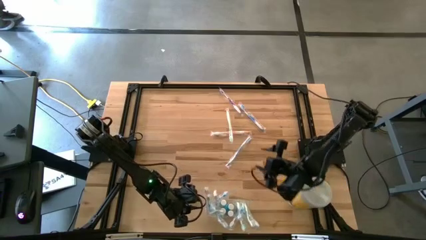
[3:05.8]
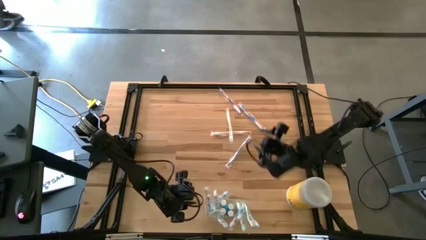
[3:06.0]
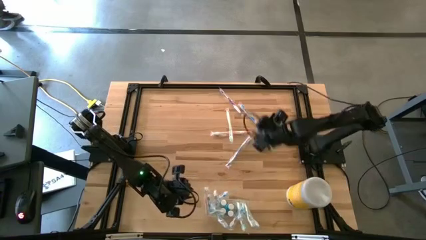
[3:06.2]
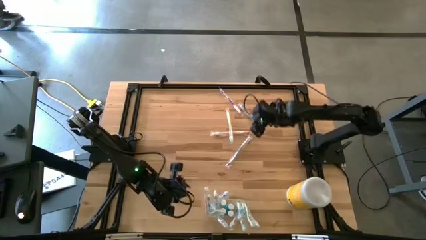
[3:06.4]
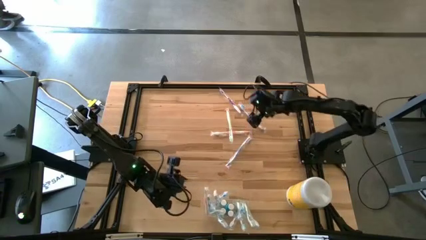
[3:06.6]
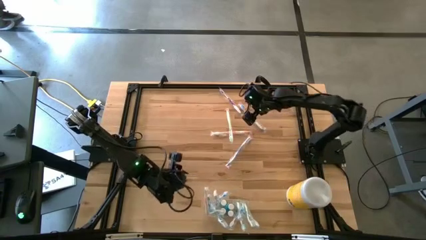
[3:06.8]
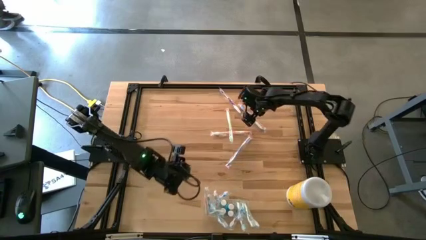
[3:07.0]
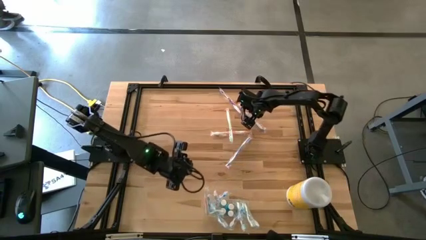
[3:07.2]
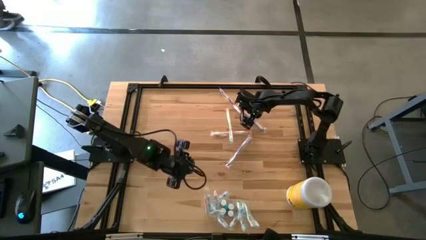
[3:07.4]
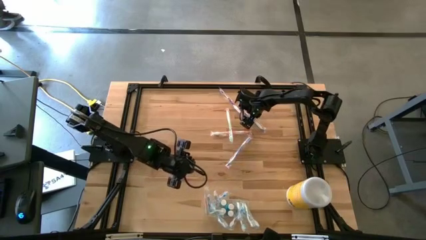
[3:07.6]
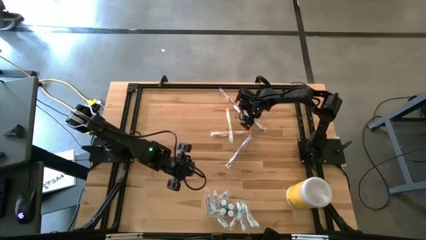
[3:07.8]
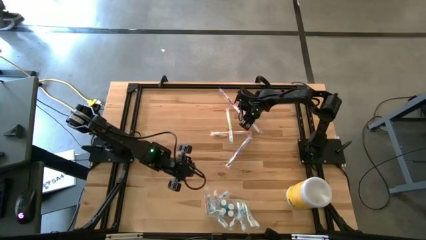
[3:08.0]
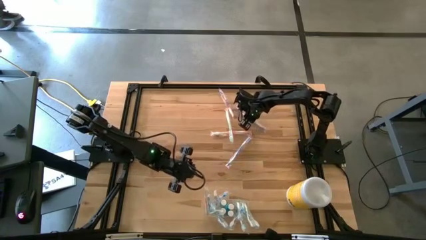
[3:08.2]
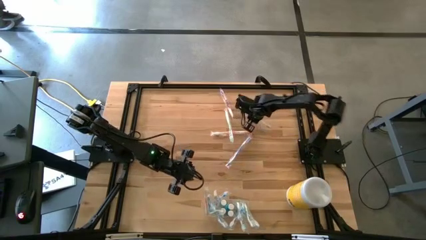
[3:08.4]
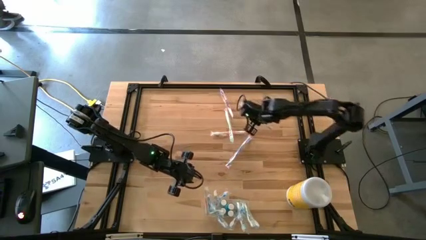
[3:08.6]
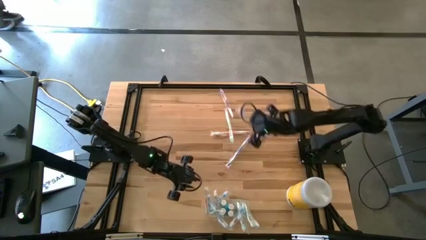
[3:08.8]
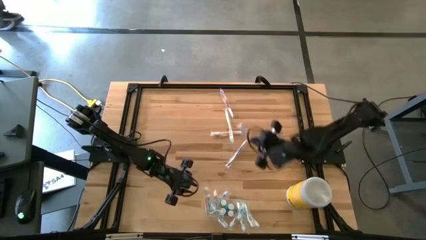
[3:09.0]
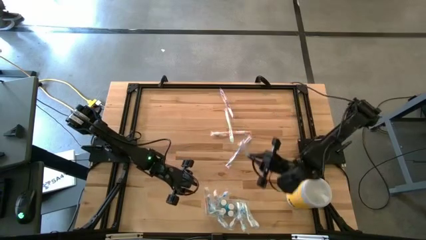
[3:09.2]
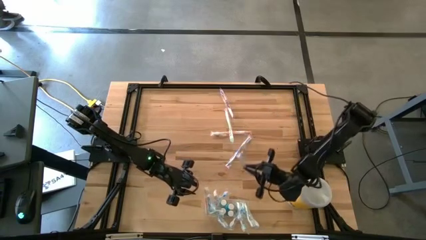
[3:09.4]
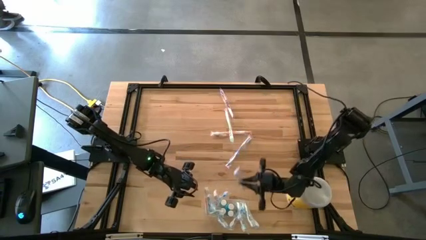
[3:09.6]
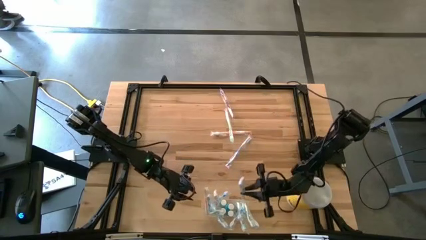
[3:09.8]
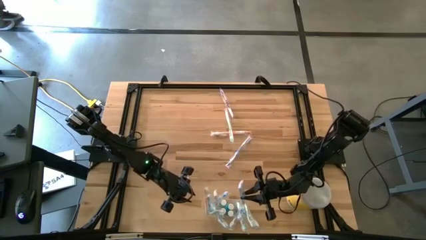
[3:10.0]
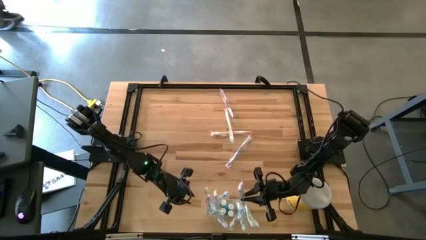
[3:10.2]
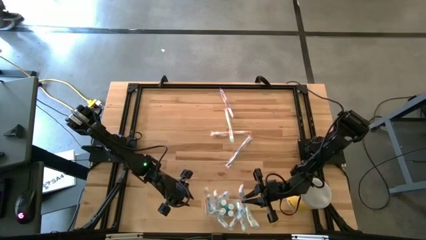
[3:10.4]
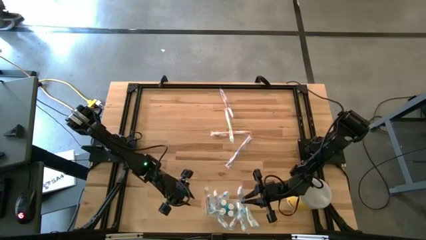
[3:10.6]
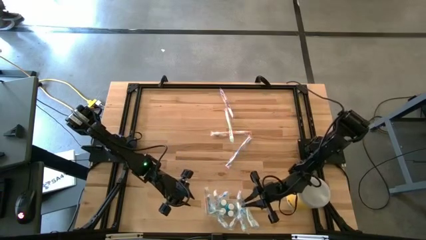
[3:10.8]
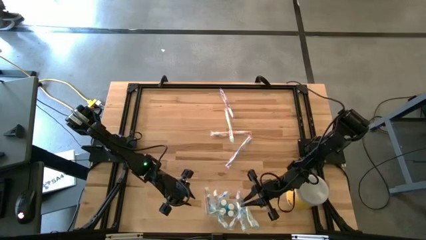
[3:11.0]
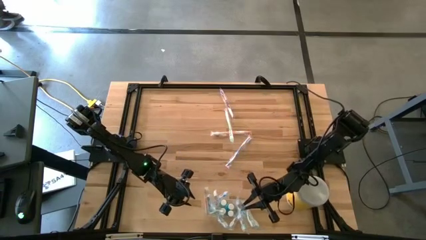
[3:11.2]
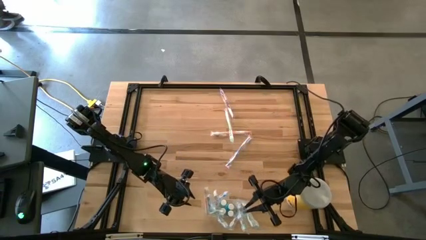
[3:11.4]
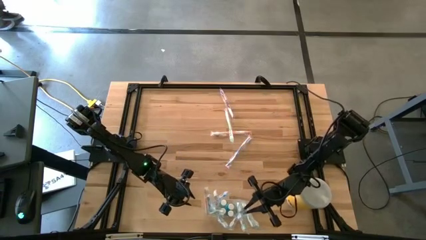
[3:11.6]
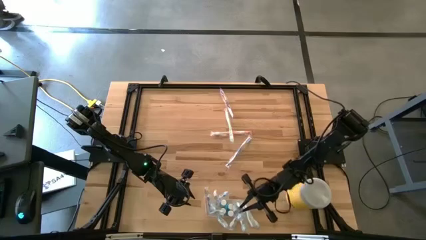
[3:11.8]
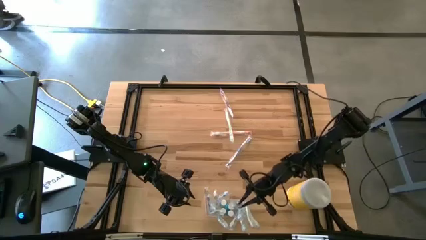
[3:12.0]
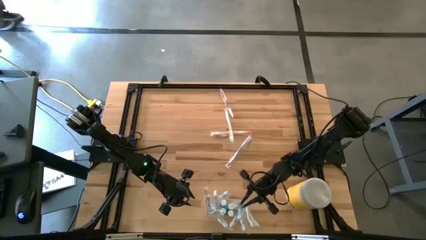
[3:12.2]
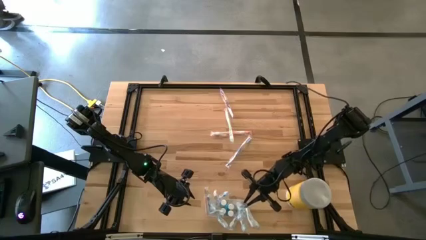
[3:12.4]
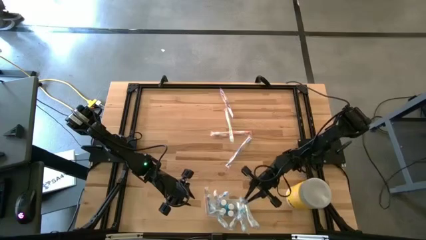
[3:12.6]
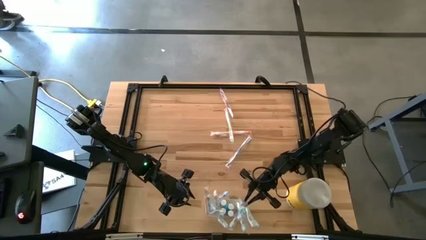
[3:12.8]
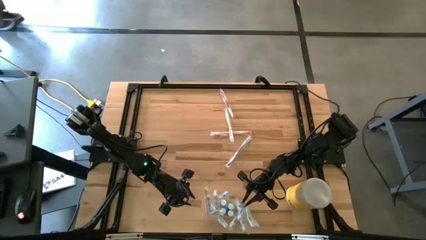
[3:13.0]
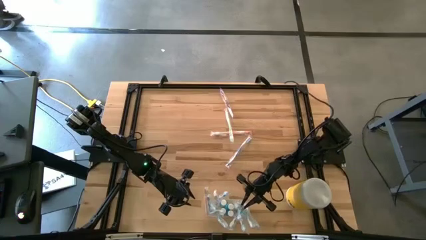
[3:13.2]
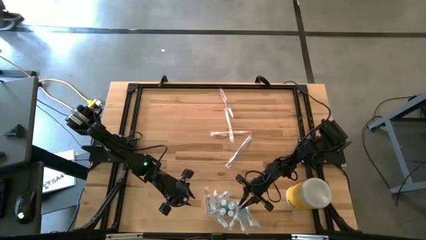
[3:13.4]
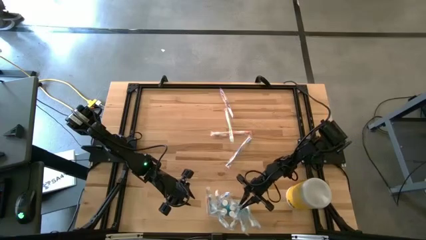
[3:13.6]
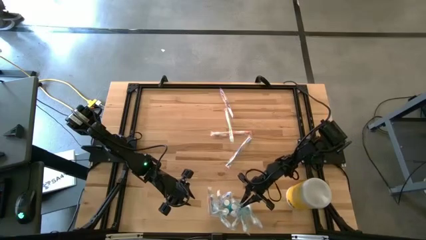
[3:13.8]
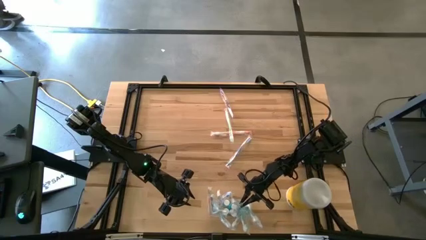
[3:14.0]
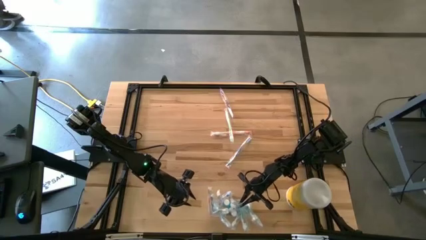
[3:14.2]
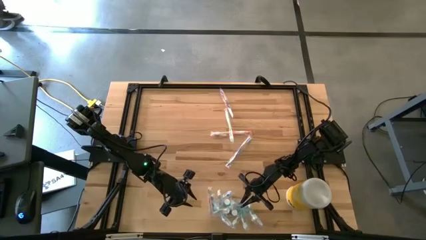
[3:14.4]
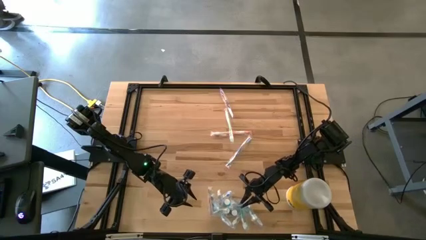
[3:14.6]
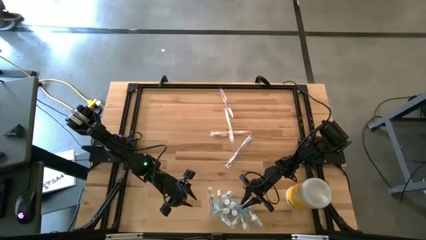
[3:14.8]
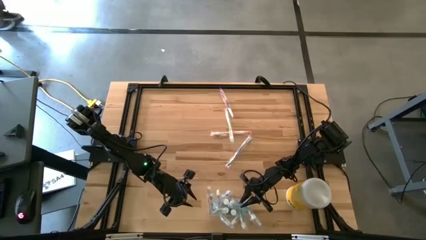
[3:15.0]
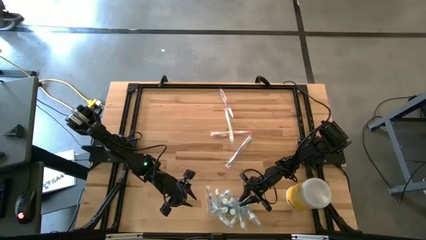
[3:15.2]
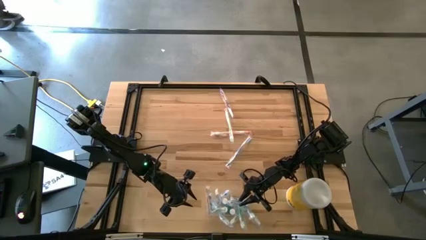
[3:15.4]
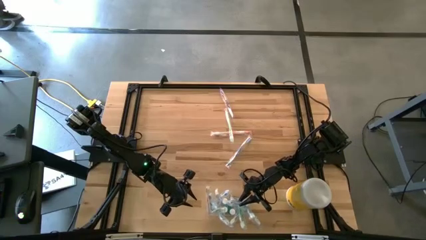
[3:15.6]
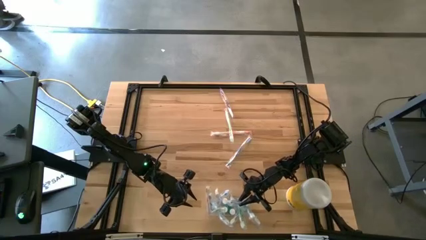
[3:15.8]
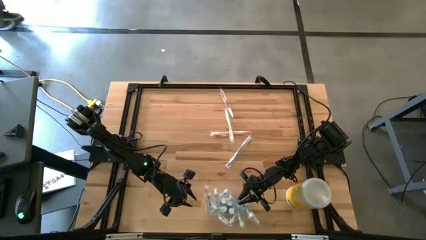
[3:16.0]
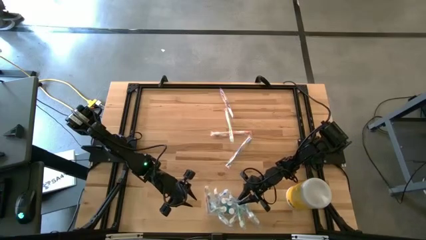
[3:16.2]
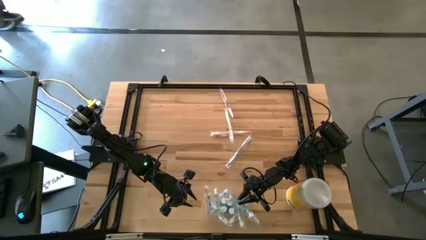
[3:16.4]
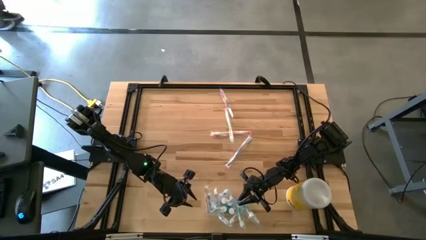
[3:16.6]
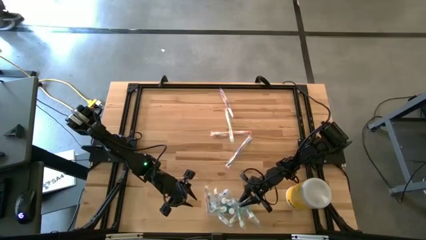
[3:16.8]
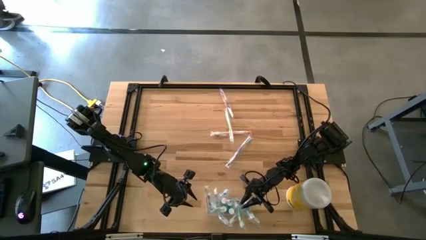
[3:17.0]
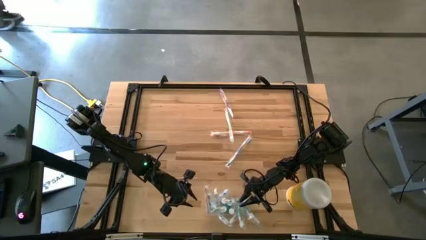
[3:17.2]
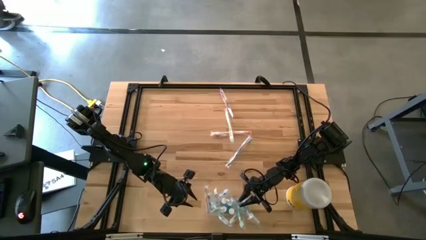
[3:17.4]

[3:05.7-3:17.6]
Task: Pick & Place toothbrushing station
Put the blue toothbrush into the transparent organizer

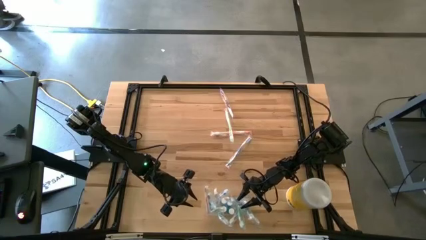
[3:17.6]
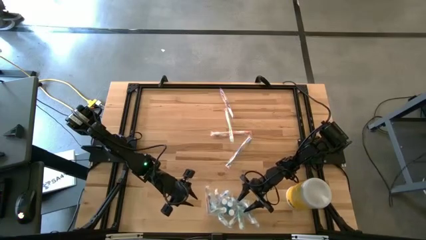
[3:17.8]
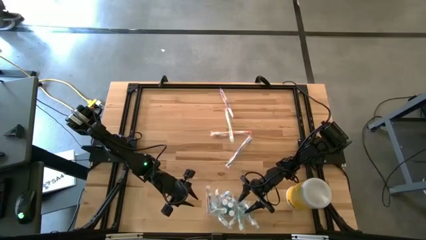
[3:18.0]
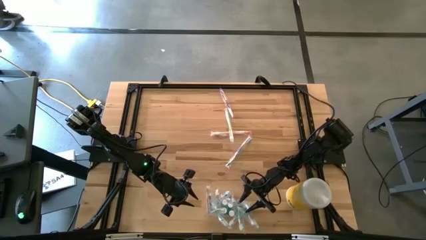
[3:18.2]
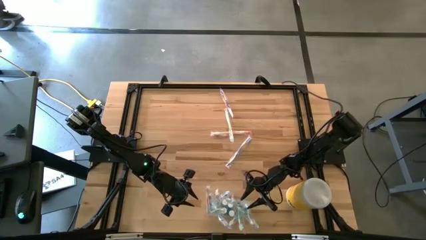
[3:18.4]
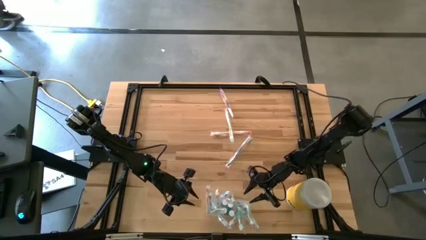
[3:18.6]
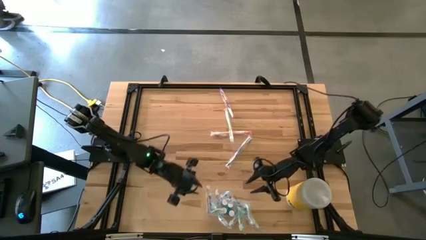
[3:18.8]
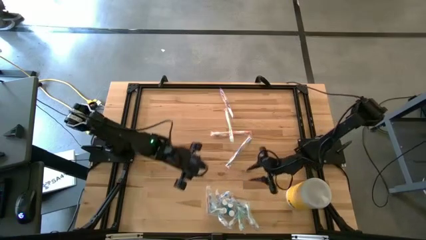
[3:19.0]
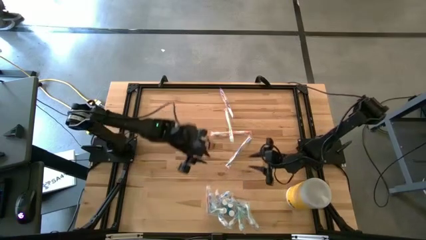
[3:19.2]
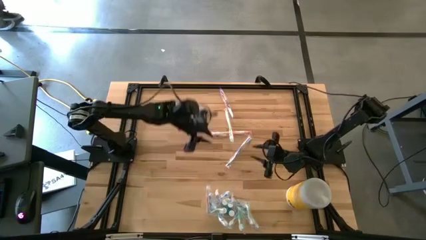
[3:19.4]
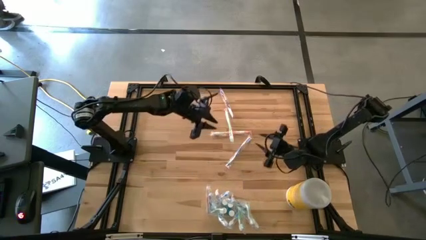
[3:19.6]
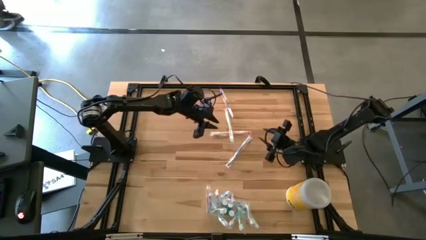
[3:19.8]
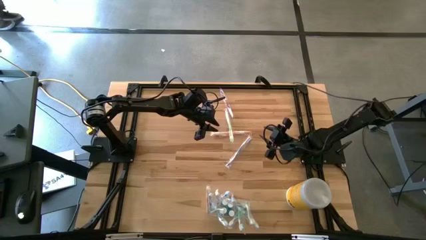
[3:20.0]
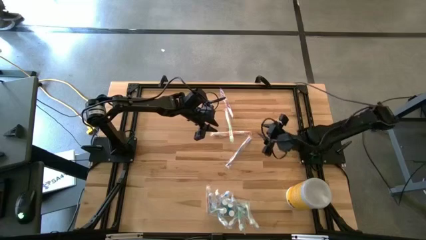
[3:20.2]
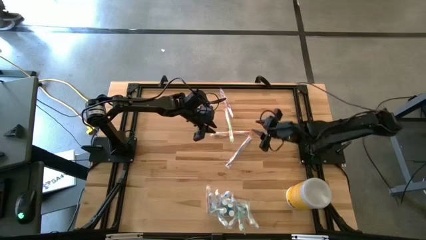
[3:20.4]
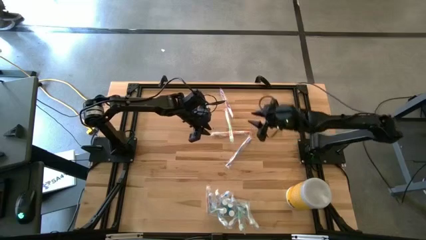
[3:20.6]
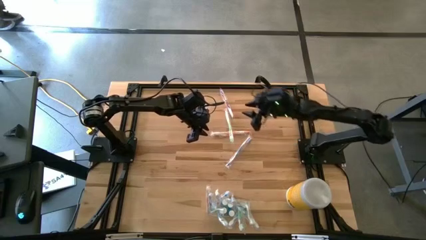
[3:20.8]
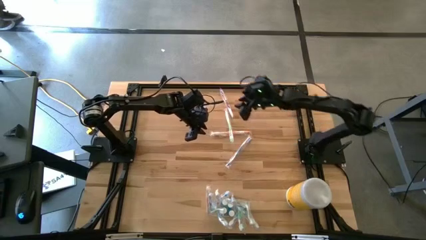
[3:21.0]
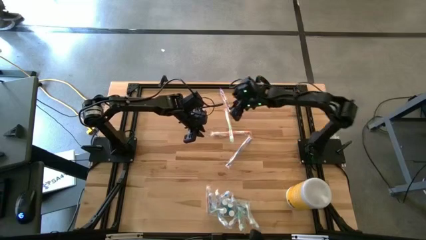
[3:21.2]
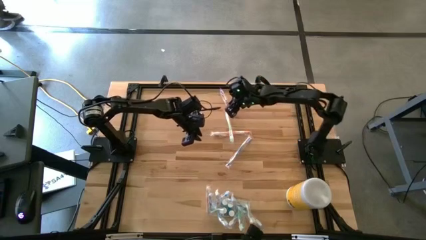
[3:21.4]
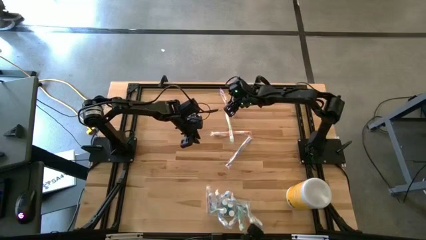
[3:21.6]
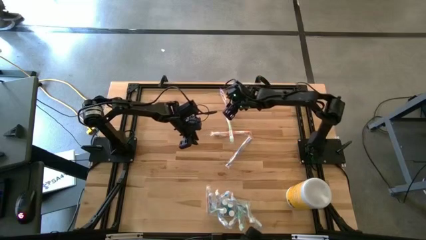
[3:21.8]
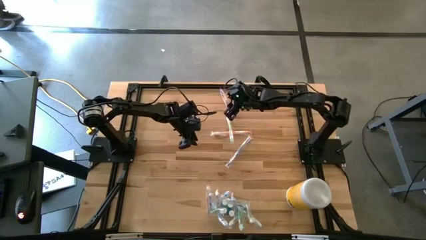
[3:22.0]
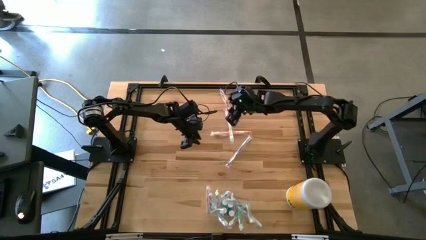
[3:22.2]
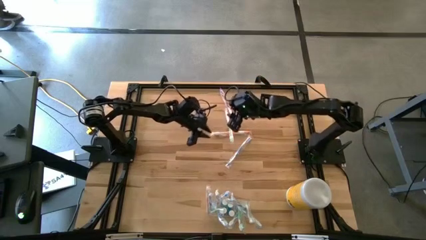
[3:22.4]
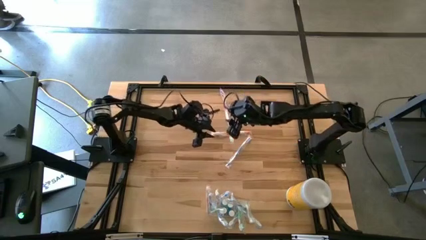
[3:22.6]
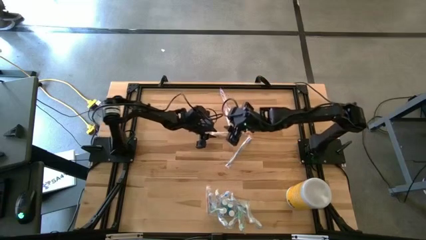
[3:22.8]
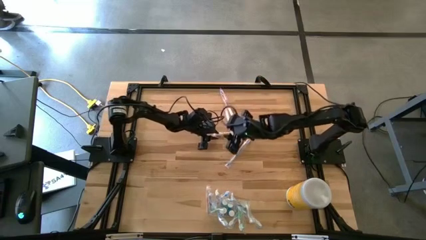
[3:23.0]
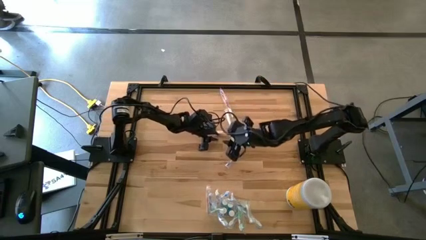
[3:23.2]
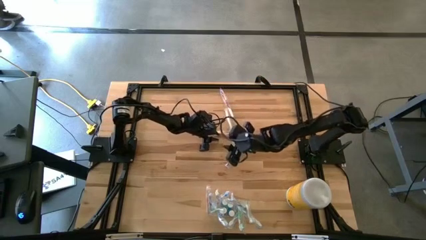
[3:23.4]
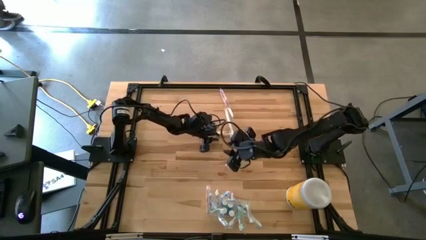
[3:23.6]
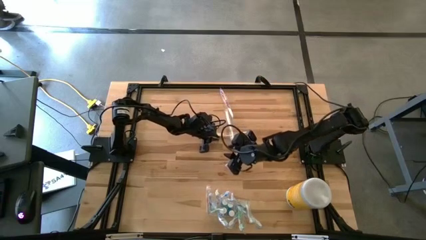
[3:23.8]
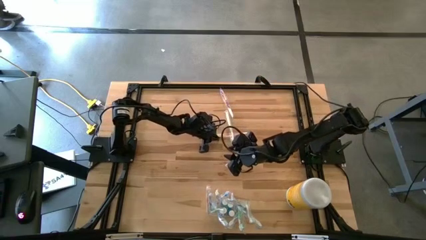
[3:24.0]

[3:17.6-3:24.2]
Put the orange toothbrush into the transparent organizer
